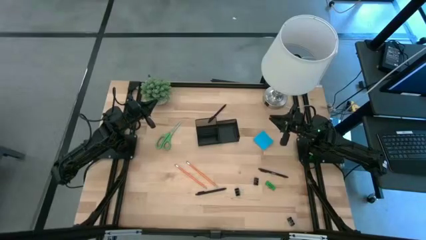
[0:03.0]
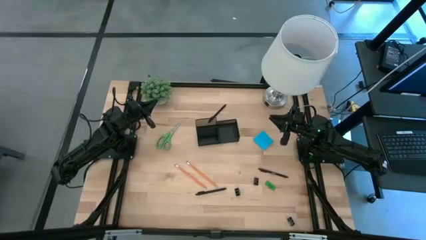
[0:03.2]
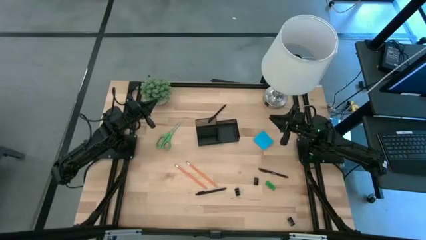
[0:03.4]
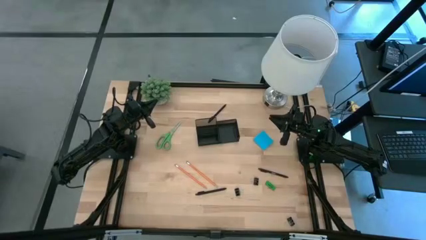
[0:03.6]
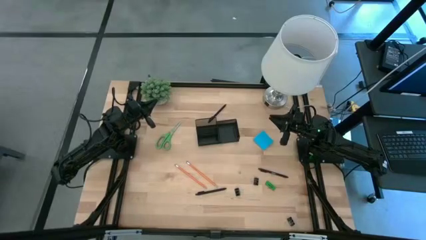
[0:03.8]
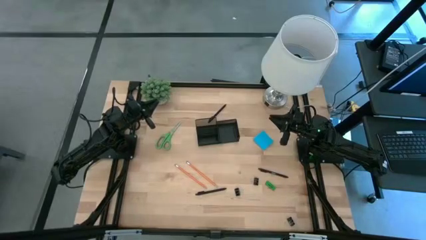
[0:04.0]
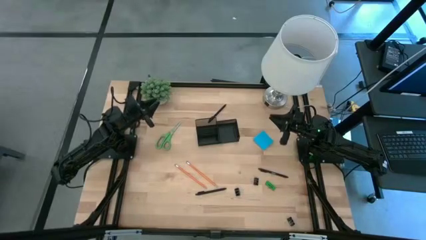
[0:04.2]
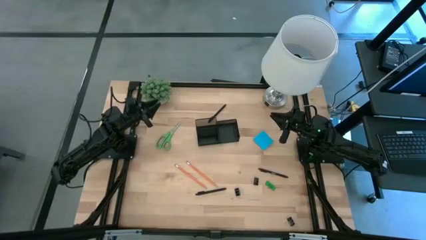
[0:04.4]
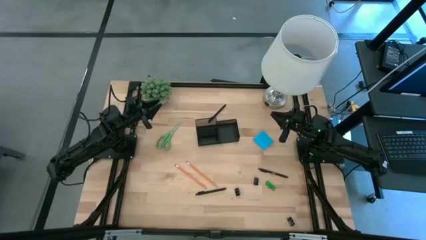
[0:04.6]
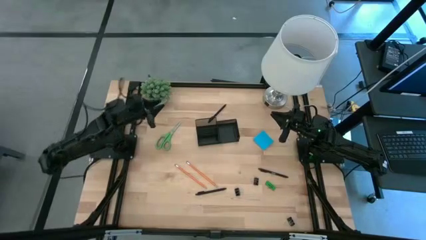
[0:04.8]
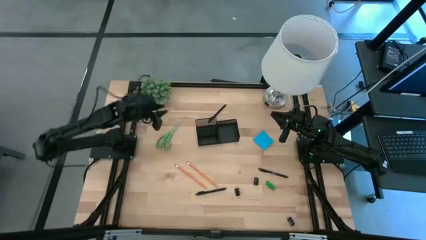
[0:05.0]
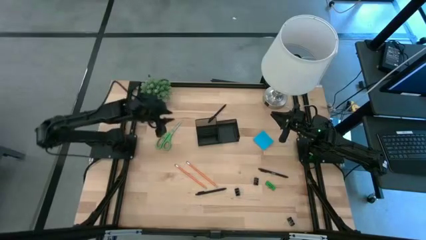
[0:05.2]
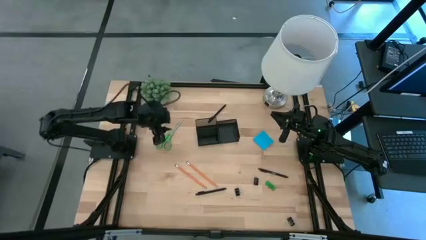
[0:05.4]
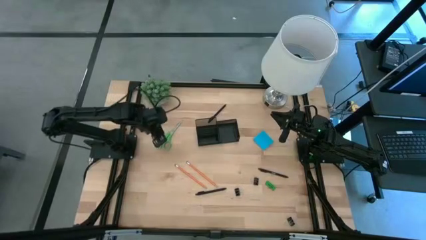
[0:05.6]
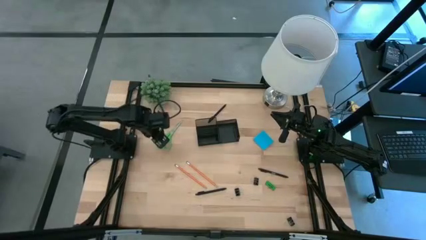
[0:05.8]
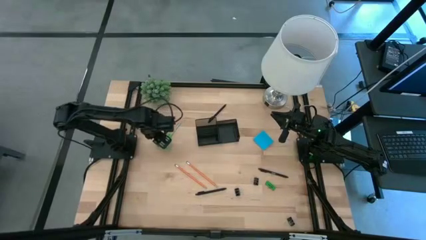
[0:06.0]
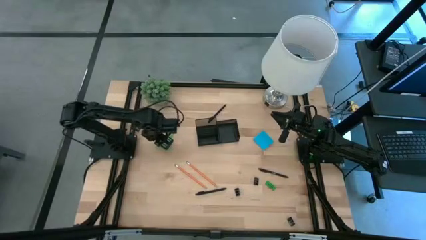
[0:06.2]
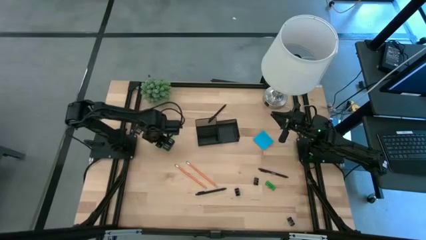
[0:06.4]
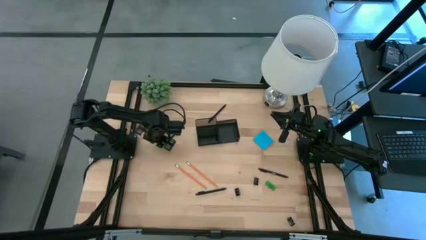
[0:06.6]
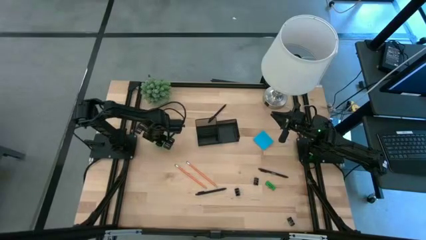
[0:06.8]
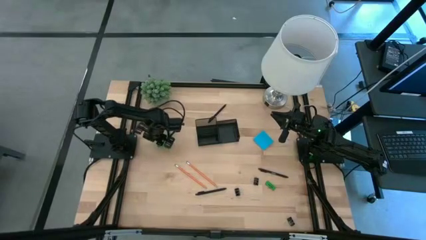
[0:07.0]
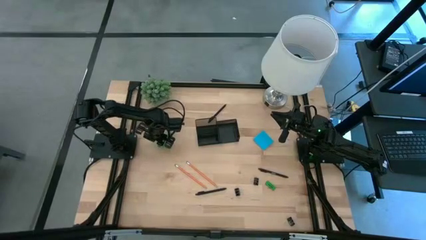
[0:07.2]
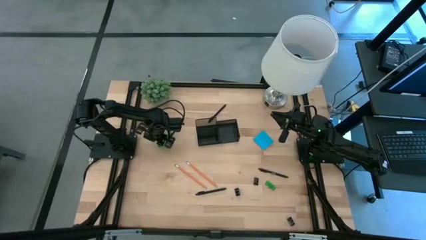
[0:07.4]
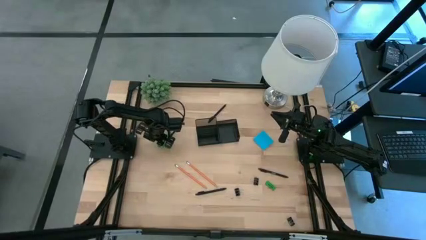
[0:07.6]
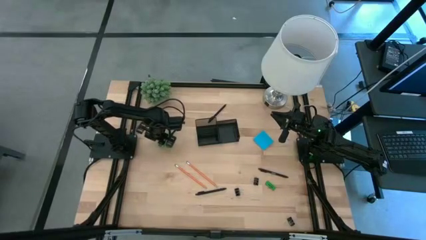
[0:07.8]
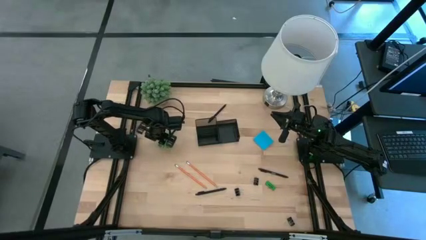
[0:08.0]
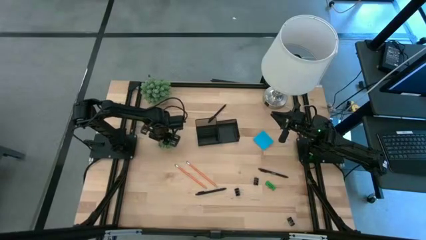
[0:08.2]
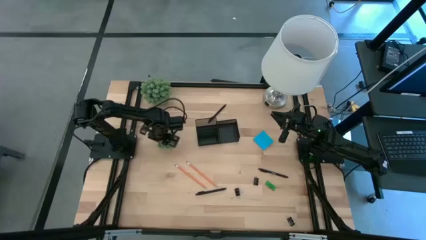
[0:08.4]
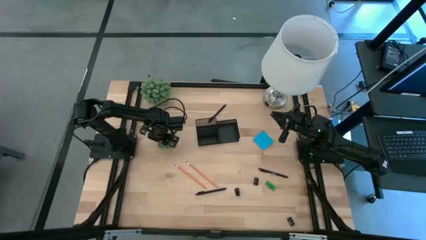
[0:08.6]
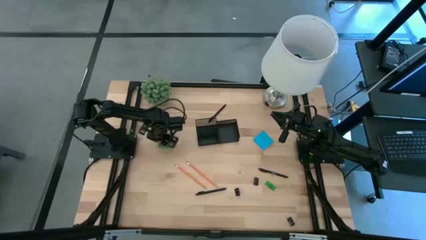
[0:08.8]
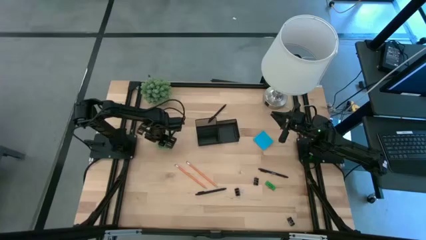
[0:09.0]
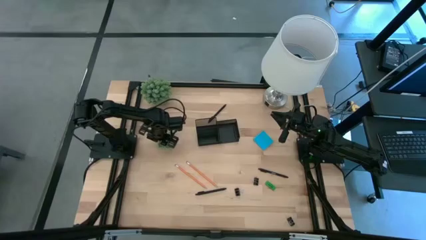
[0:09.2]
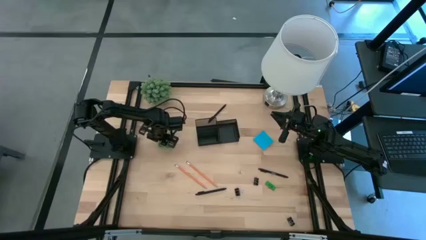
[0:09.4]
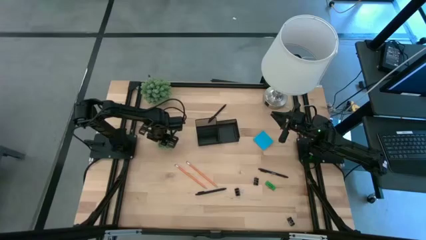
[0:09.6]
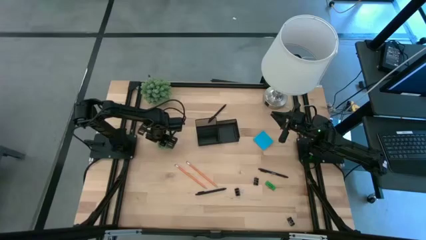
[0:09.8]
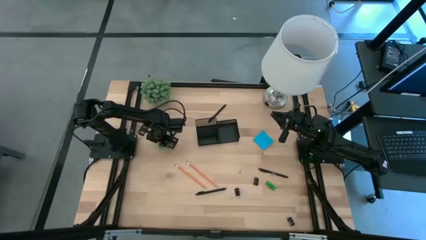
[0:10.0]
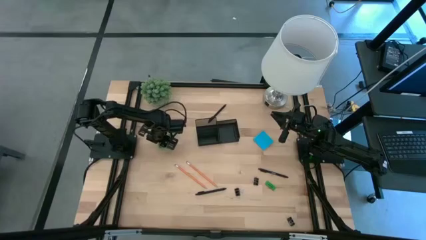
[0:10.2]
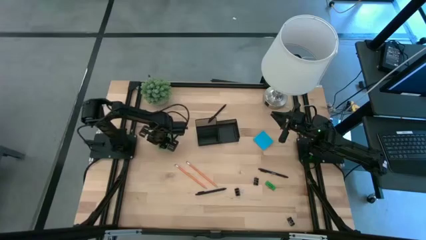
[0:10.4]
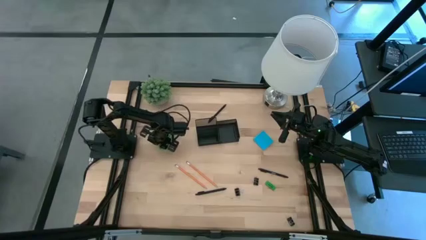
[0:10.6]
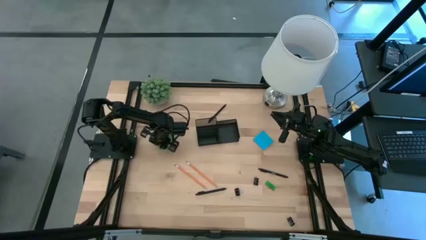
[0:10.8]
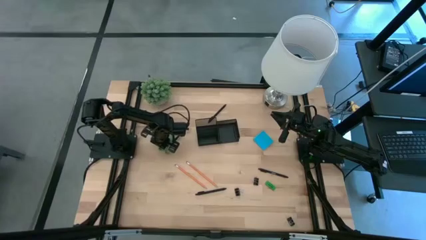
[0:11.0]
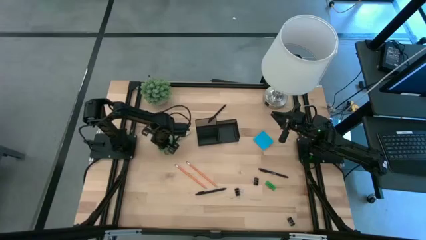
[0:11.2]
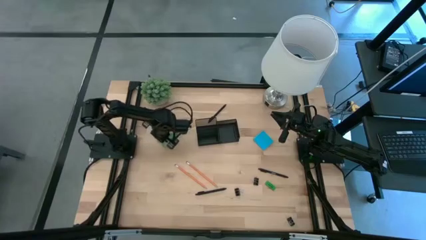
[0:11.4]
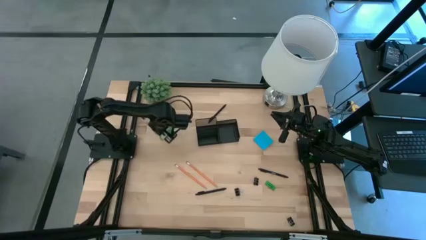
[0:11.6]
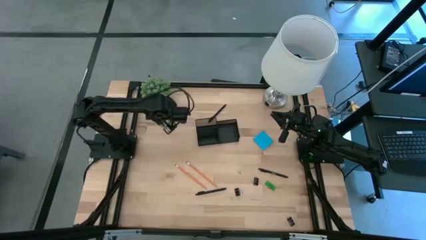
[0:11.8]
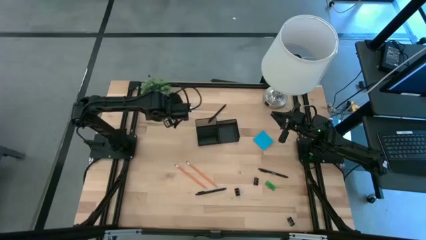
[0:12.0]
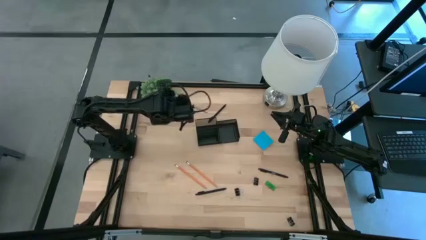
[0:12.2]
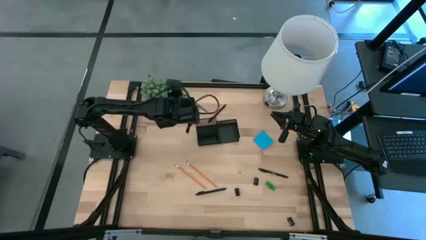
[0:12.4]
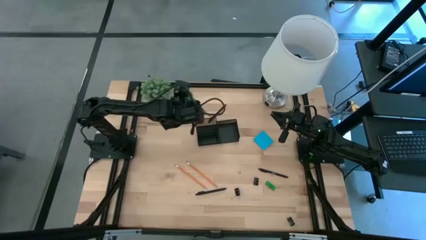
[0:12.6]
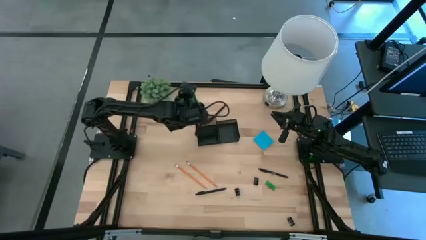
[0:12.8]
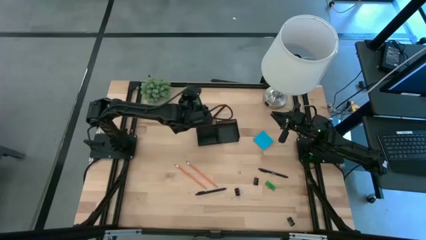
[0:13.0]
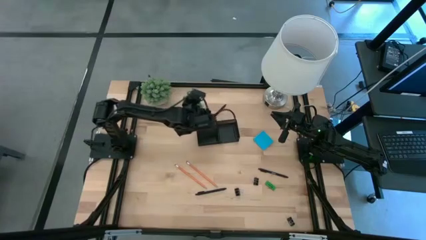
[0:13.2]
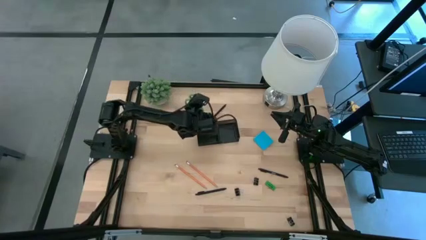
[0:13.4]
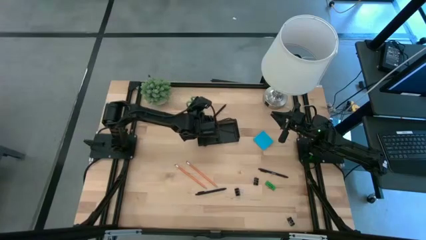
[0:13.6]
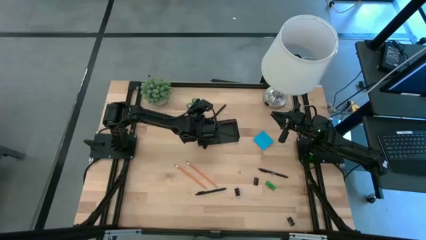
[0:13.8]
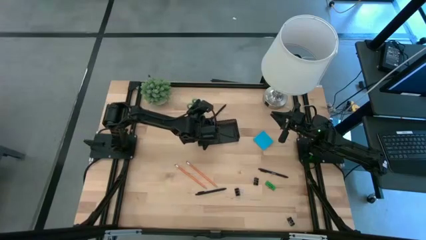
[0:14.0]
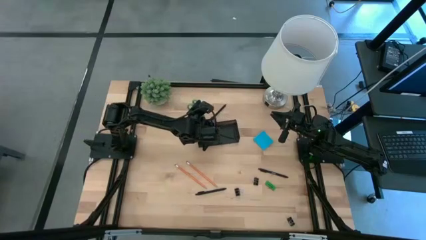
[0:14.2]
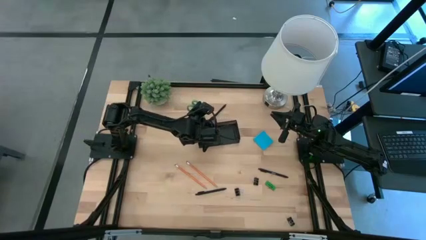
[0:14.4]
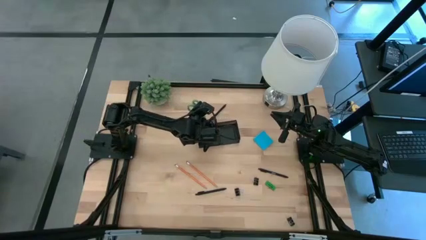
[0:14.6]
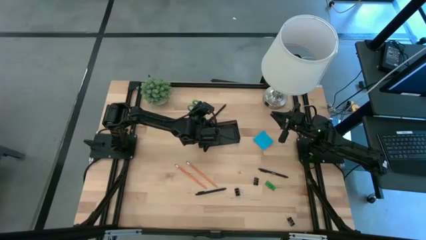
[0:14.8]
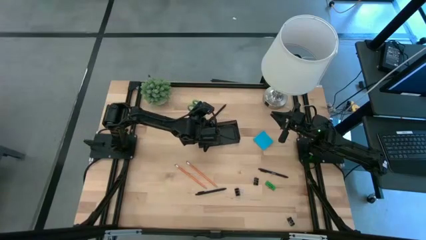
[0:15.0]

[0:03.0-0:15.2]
Task: Pick and place office supplies into organizer
Put the green scissors into the black organizer
